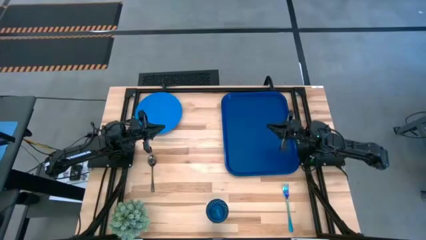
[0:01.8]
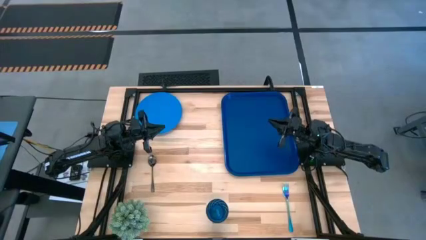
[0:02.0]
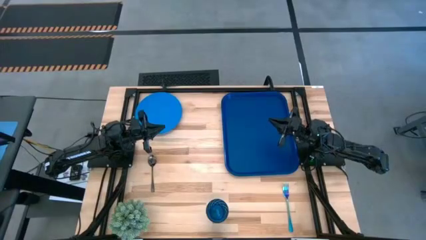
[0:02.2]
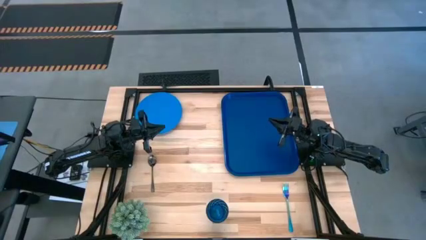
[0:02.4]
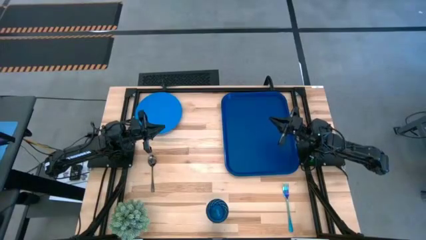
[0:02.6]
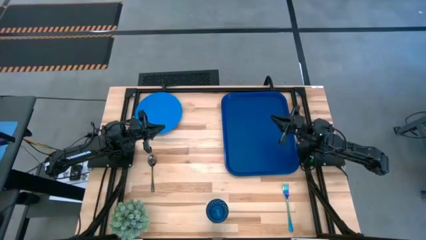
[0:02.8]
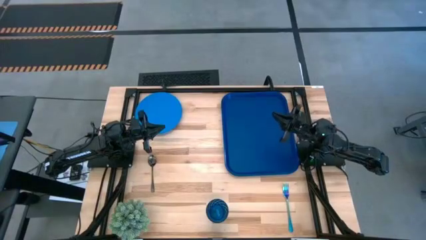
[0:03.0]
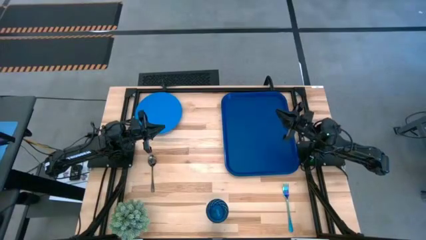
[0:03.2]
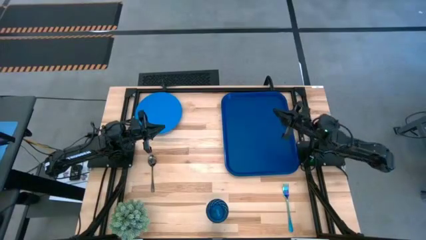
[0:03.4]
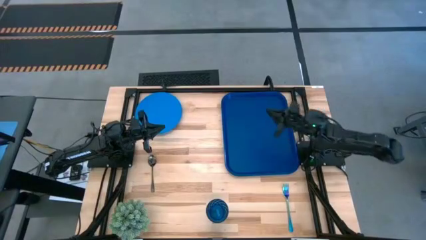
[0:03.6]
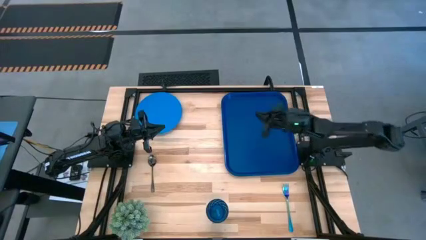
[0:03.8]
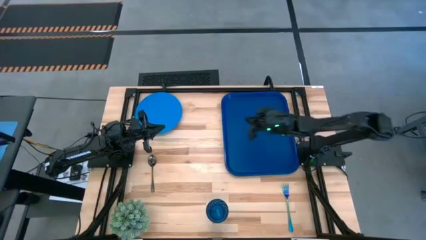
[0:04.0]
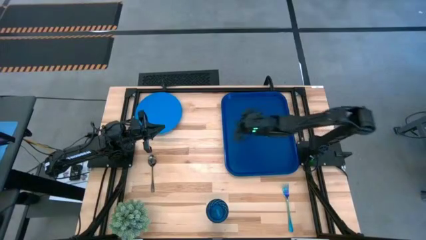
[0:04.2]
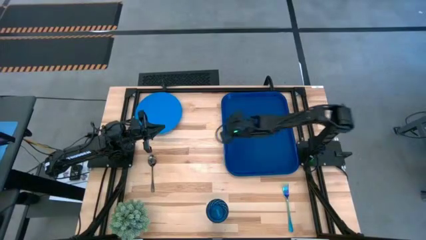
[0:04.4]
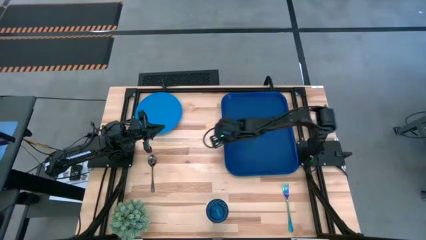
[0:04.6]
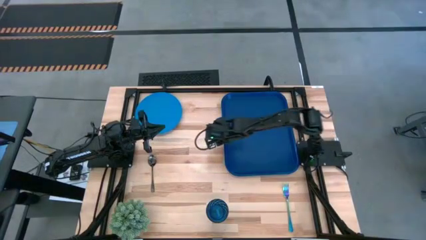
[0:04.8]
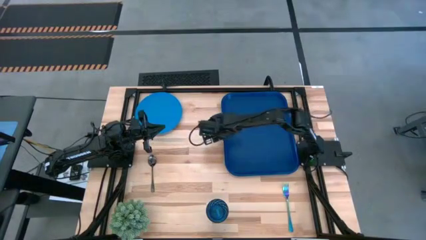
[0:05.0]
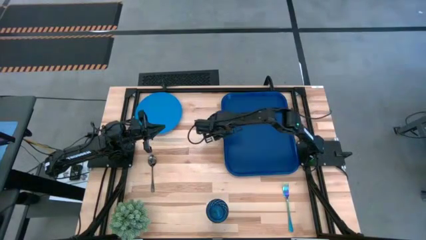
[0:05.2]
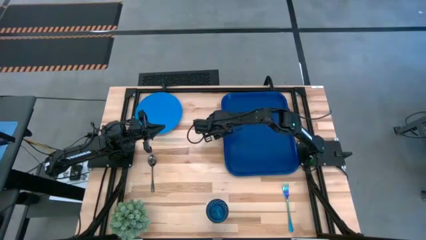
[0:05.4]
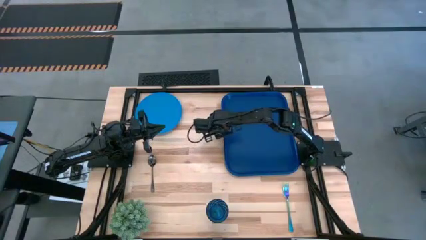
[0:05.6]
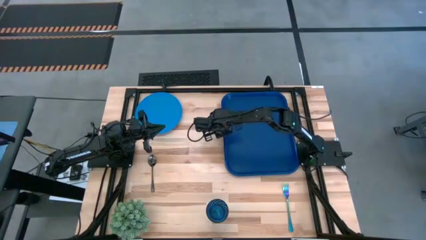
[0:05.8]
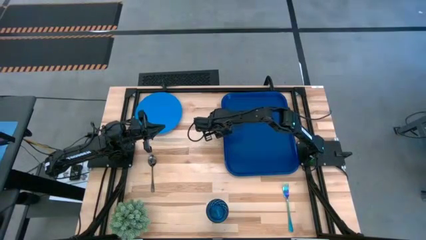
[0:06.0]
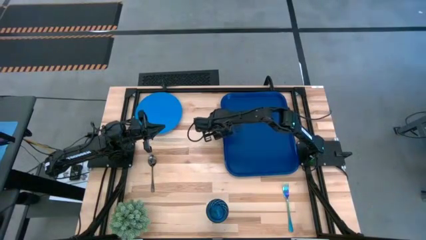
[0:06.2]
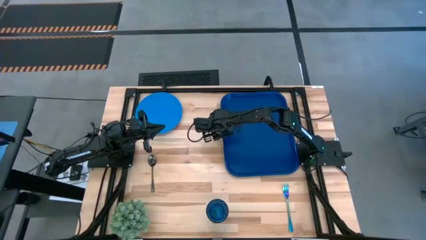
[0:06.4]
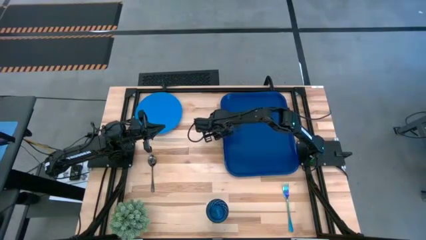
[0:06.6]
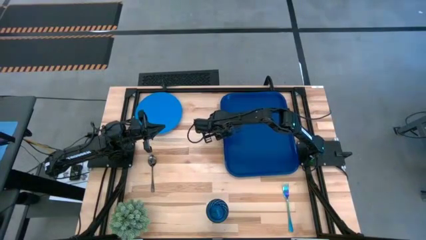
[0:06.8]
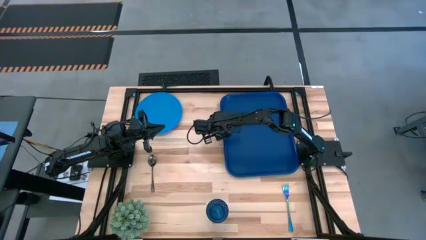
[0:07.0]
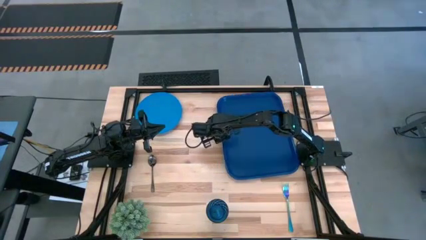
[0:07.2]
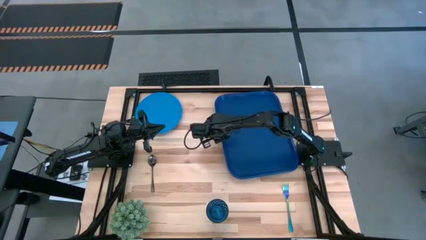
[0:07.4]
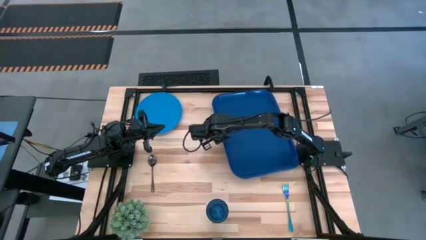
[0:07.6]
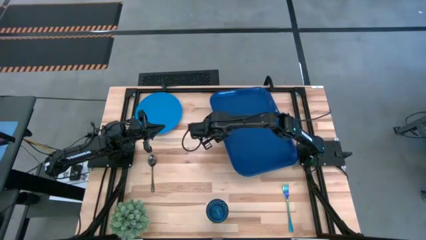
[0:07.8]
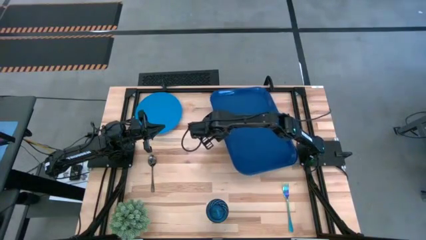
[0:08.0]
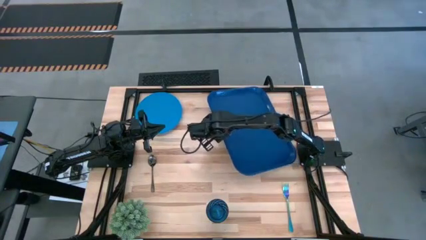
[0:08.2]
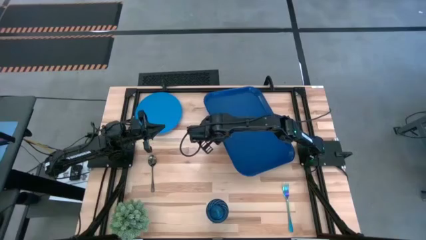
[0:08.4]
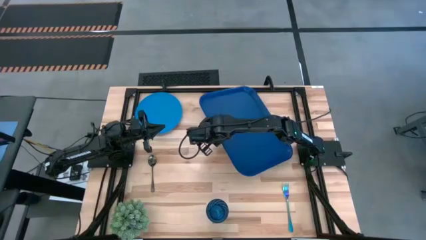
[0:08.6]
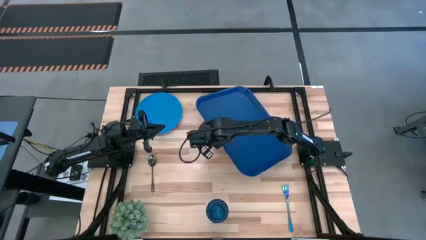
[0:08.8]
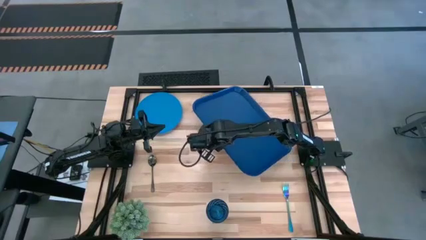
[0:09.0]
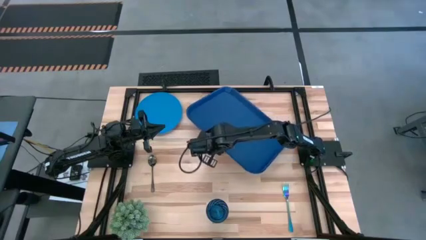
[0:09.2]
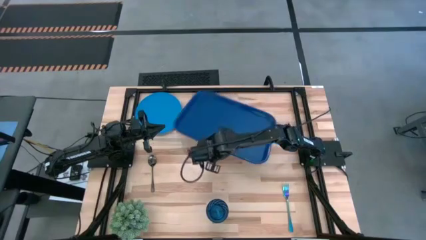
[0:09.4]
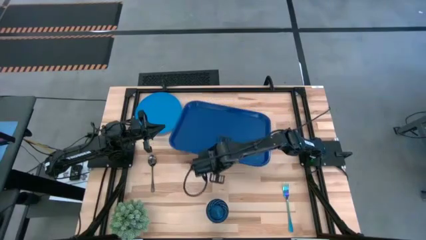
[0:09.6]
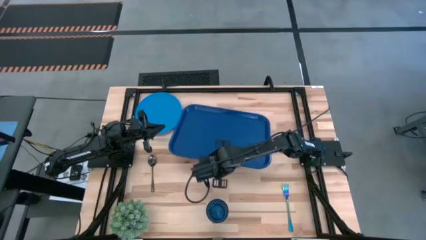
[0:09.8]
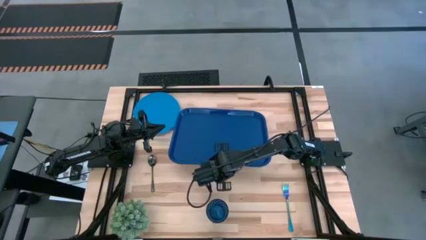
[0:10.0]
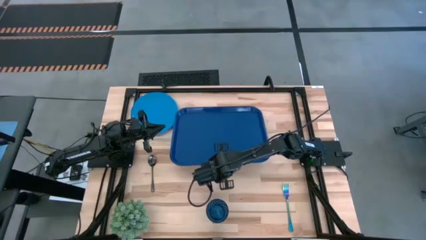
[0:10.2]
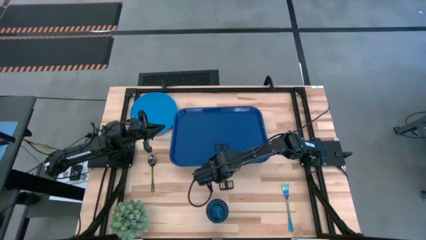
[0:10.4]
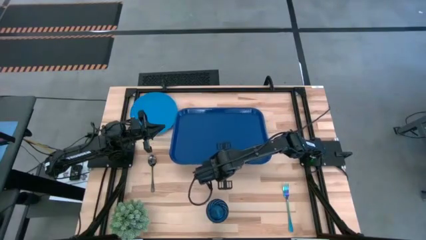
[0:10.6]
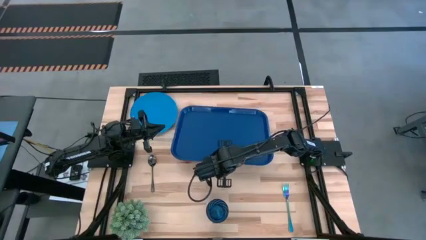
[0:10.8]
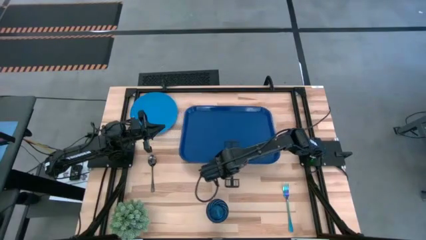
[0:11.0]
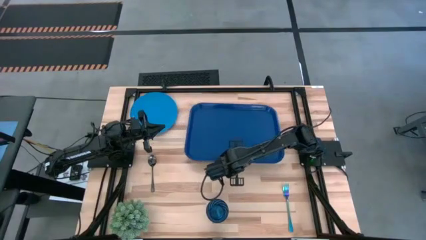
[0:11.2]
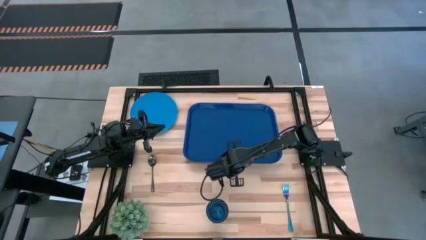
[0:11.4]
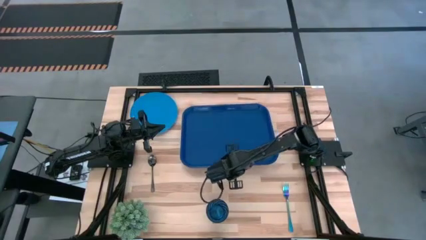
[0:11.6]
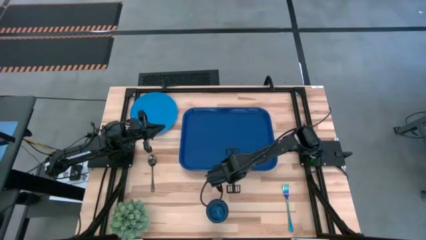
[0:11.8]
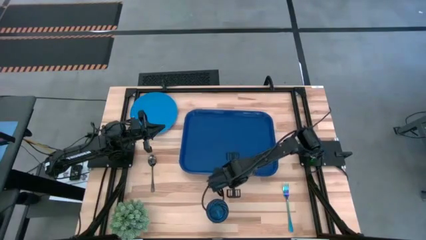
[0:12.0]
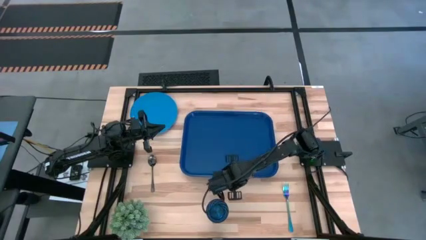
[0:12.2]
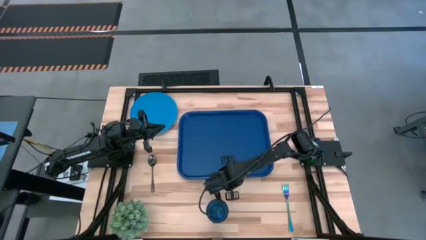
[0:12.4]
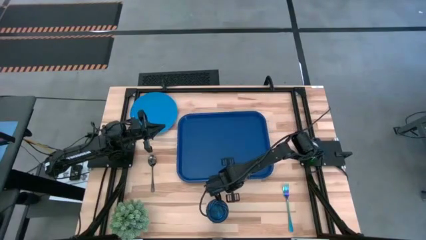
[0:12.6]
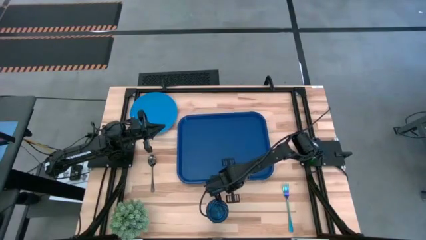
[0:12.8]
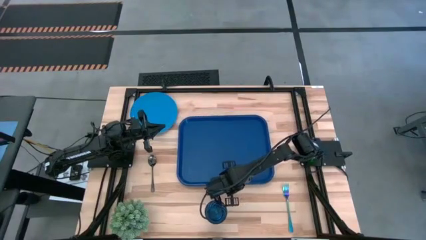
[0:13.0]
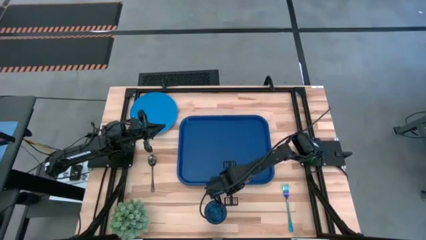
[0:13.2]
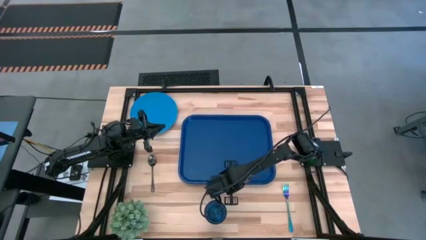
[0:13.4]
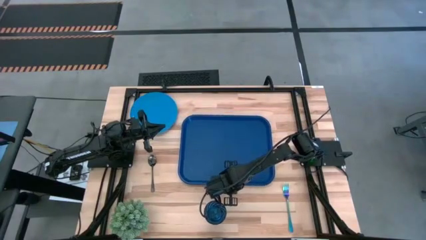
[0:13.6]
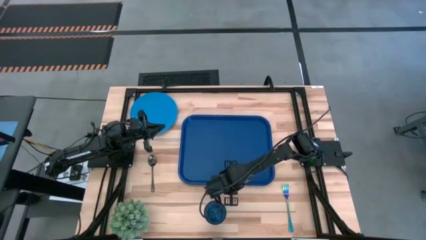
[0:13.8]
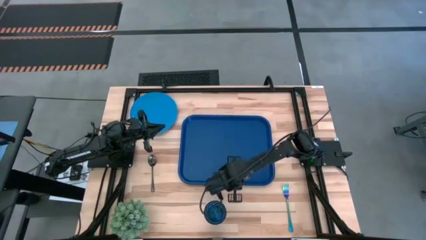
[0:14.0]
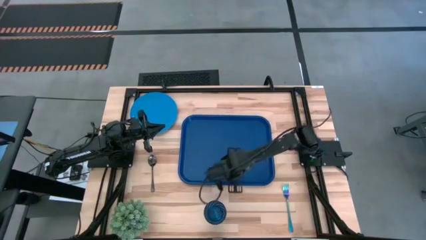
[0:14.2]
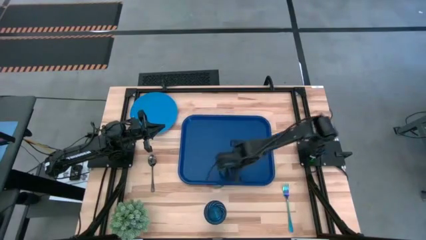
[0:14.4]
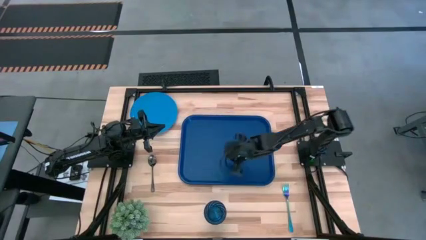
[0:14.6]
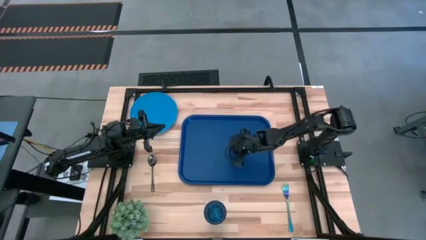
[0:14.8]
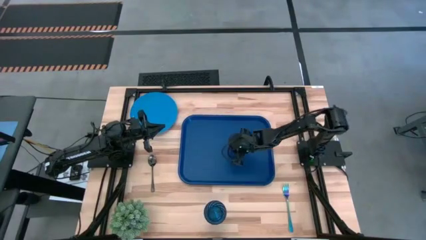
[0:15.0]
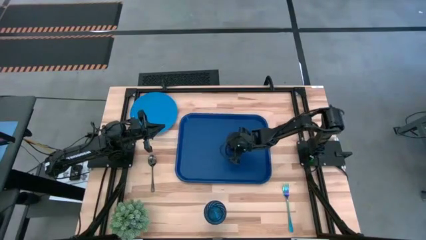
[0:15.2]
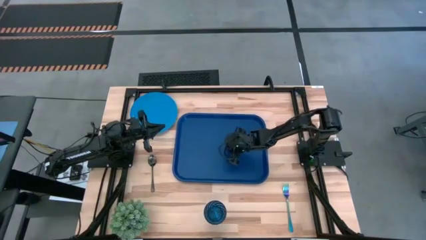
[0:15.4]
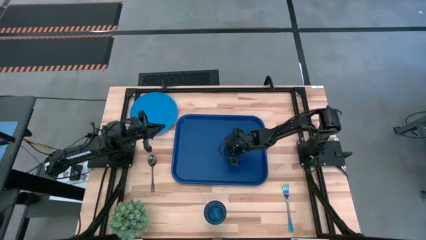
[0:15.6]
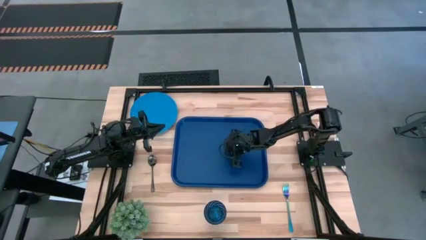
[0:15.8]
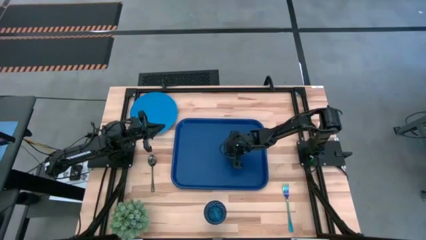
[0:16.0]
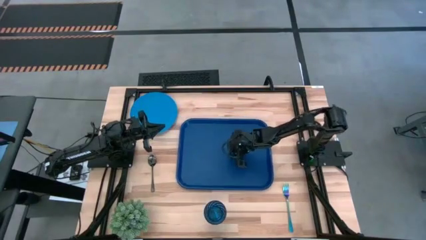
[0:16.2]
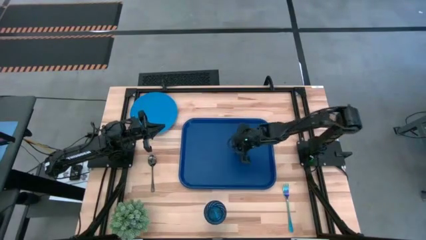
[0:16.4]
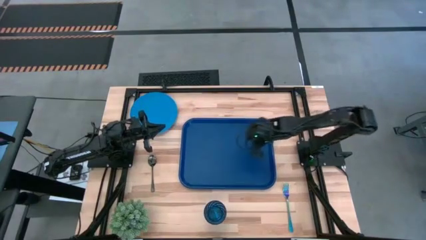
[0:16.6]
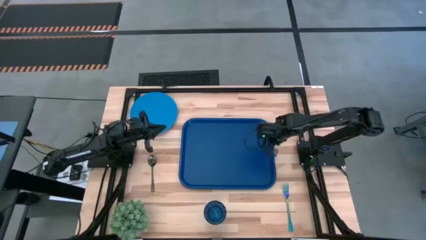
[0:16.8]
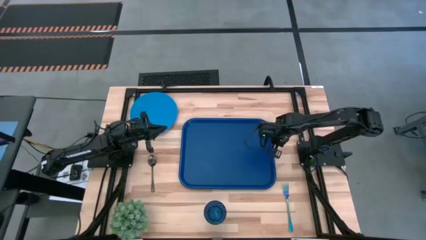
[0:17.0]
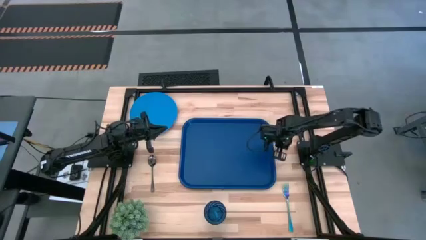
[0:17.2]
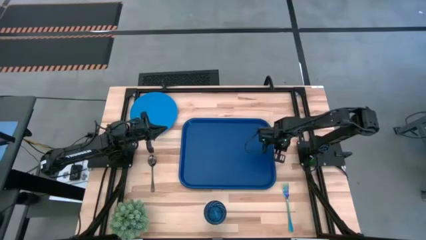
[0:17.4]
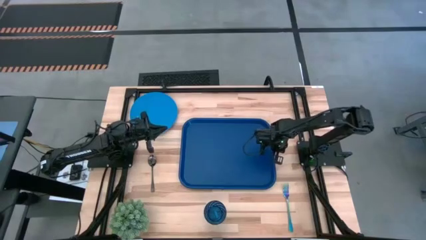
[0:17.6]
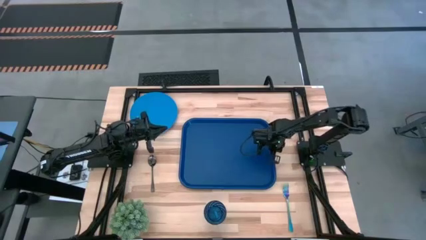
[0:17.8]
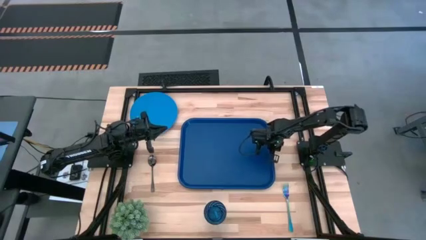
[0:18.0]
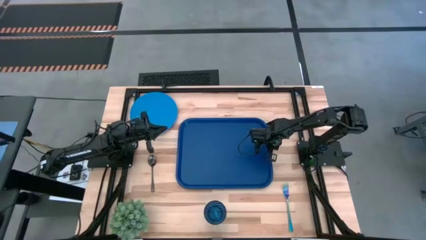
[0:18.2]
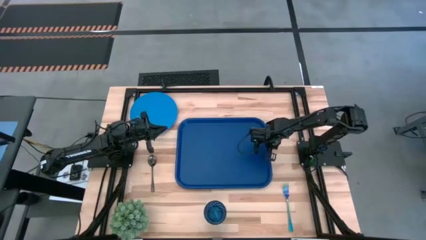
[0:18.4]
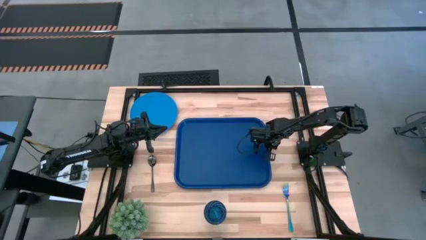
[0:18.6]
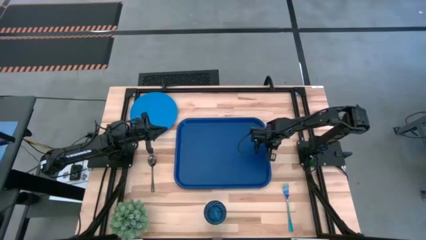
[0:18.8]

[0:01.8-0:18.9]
Task: Pick and place plate/cup/fork/spoon on tray
Move the dark blue tray to the center of the table
